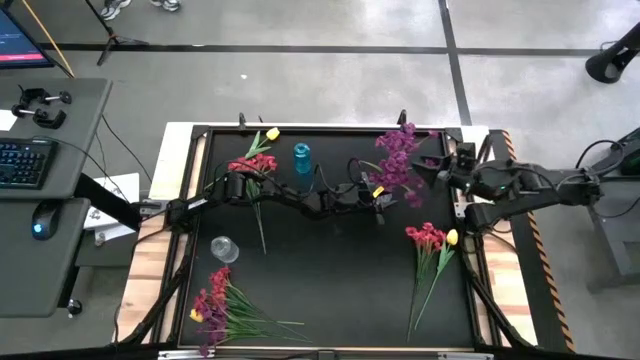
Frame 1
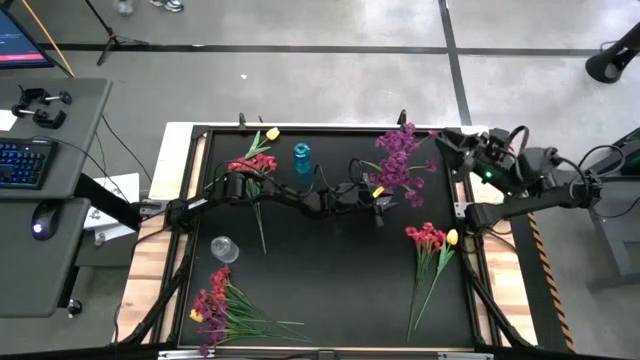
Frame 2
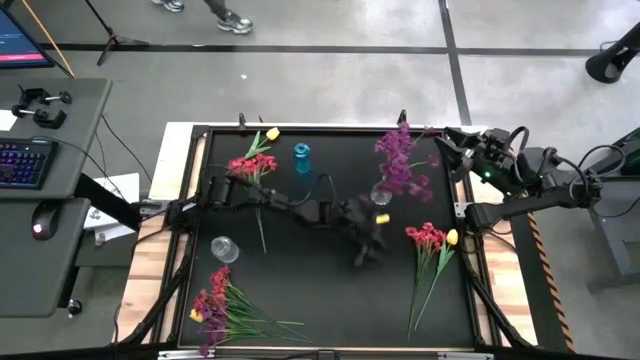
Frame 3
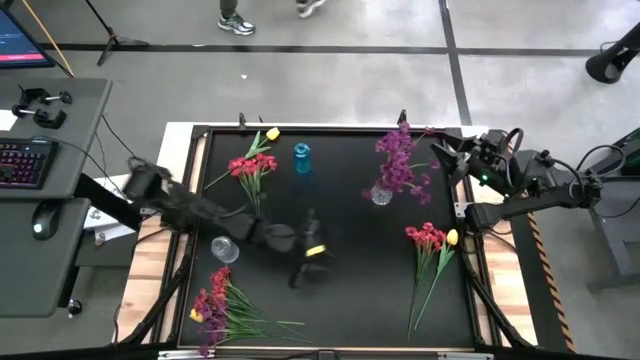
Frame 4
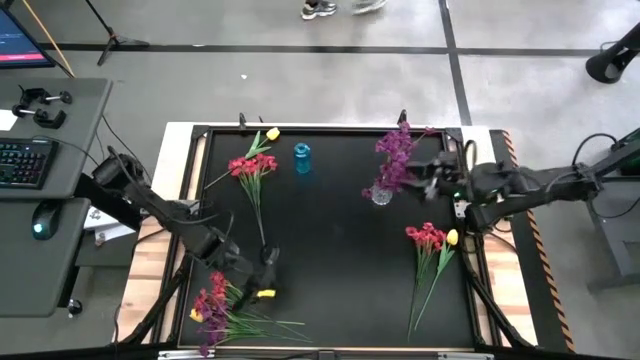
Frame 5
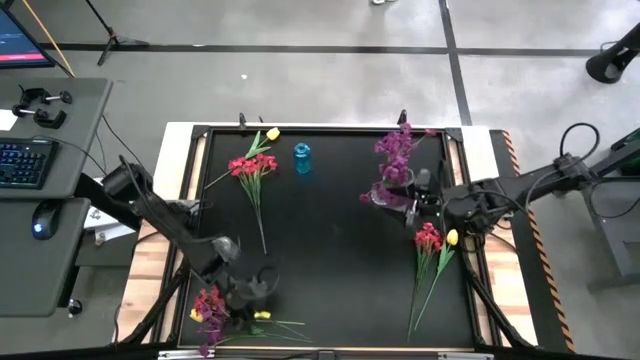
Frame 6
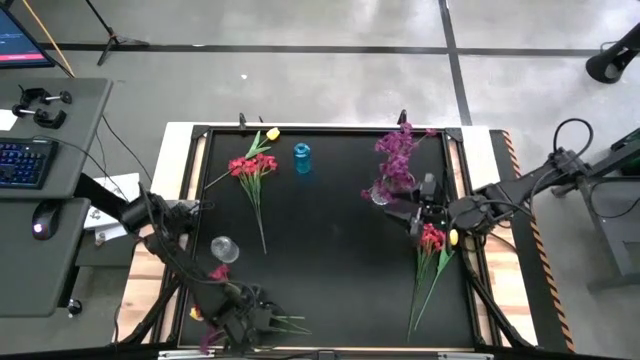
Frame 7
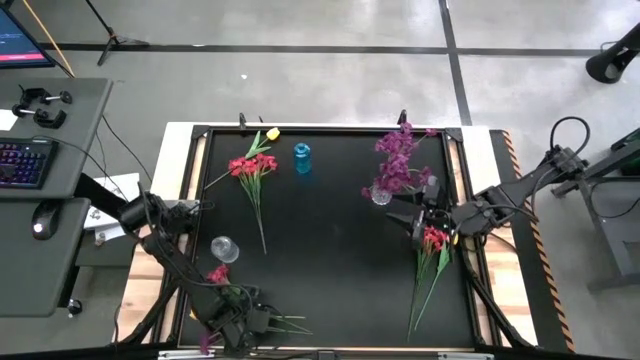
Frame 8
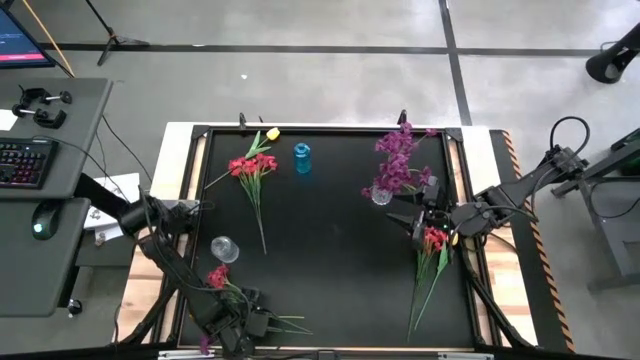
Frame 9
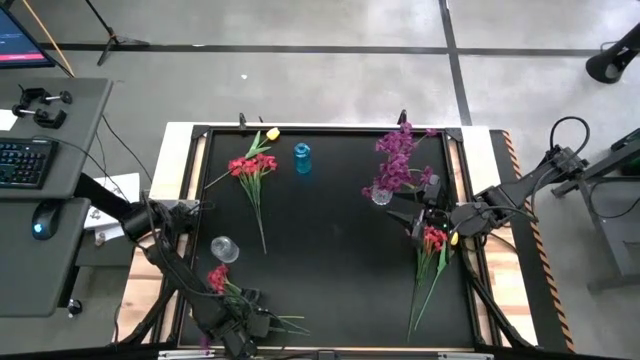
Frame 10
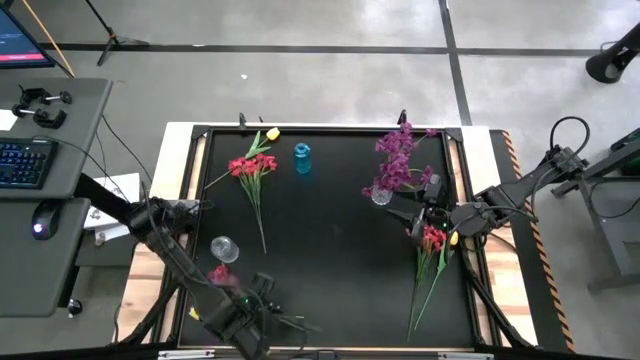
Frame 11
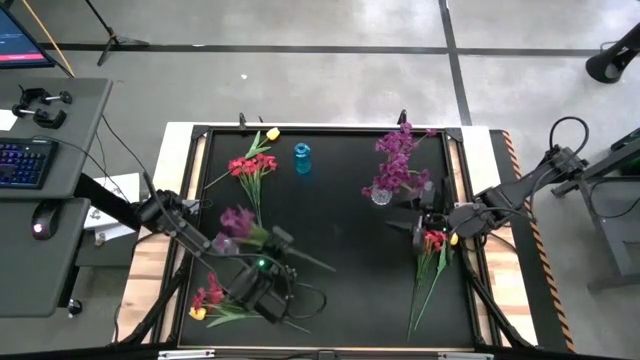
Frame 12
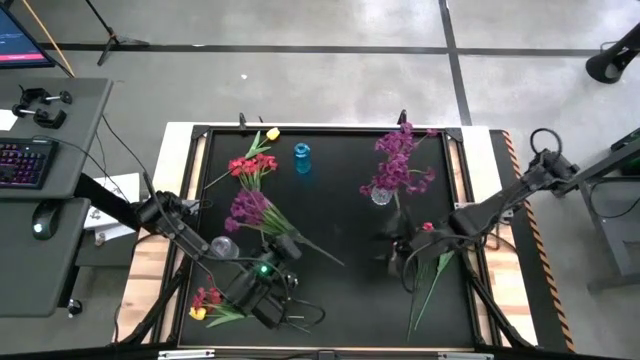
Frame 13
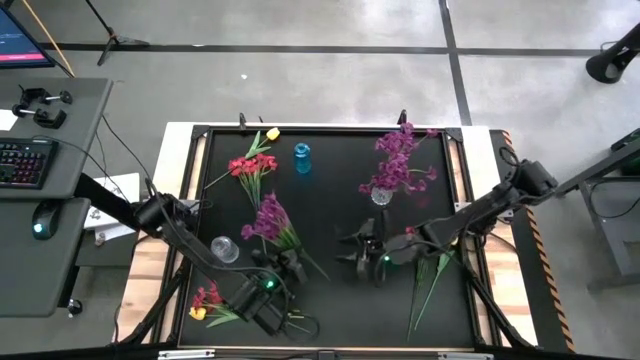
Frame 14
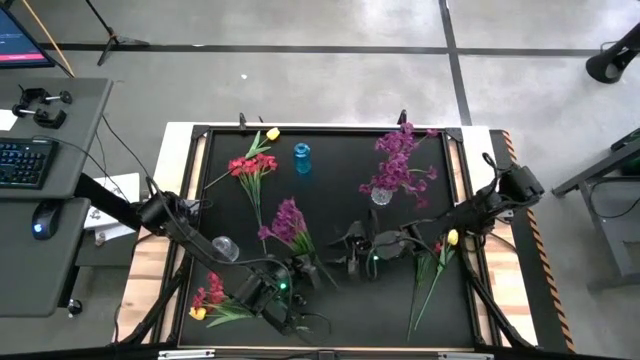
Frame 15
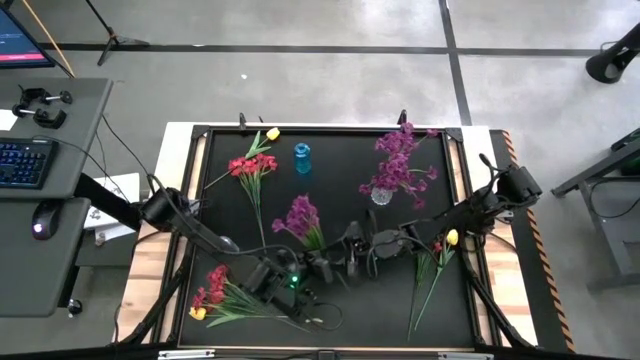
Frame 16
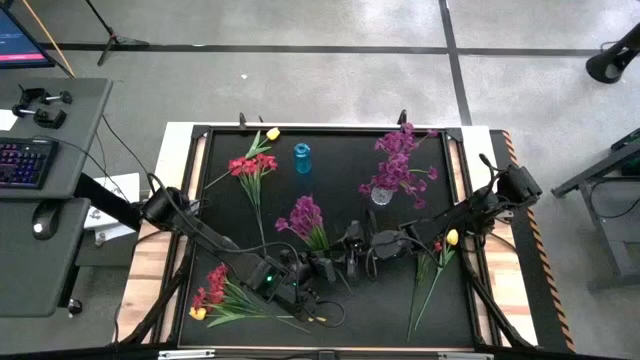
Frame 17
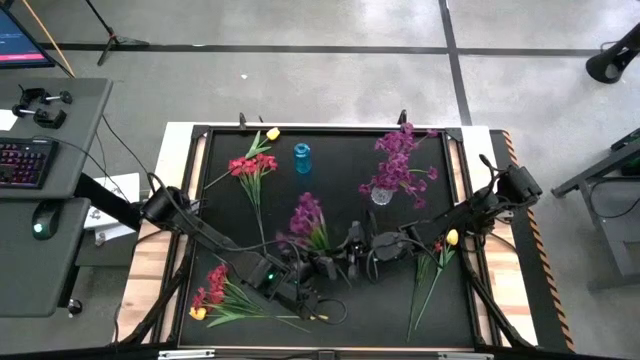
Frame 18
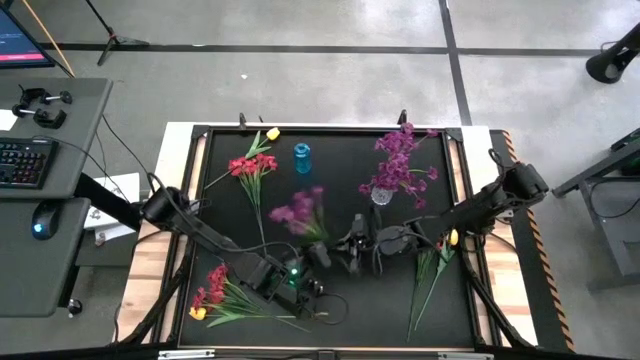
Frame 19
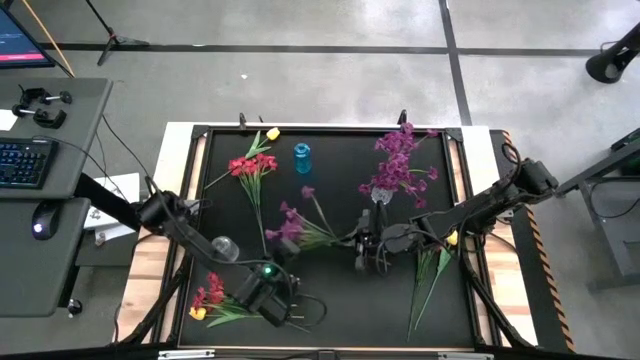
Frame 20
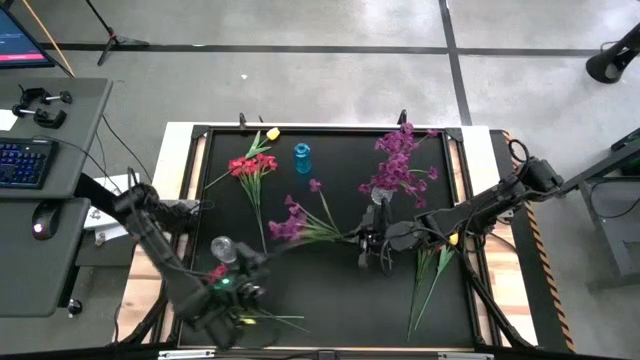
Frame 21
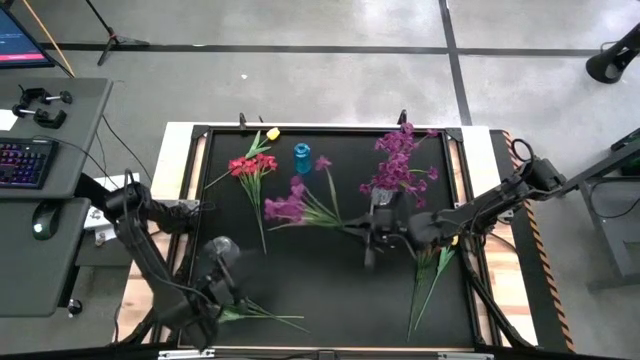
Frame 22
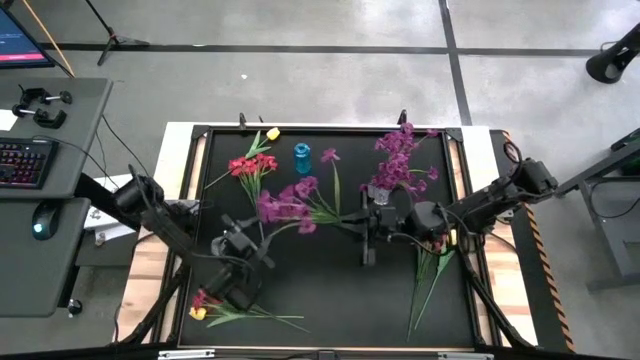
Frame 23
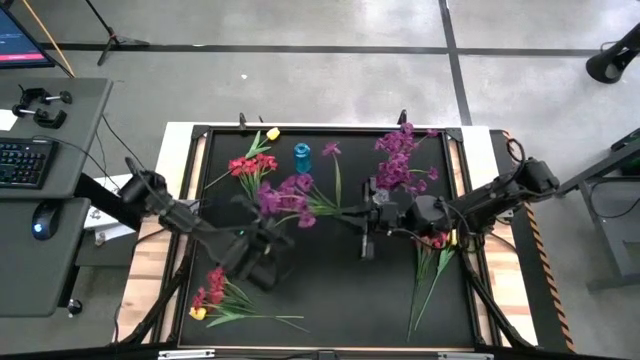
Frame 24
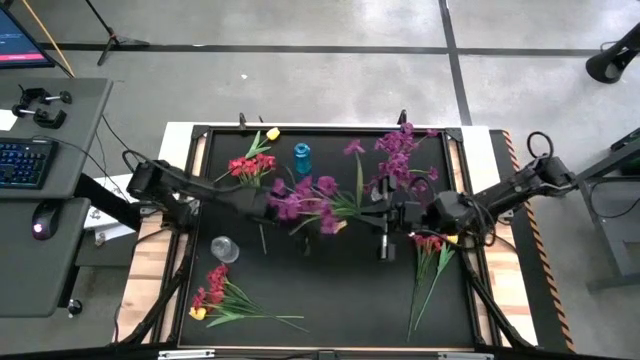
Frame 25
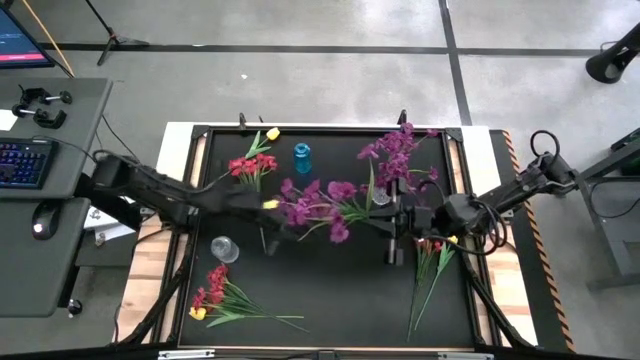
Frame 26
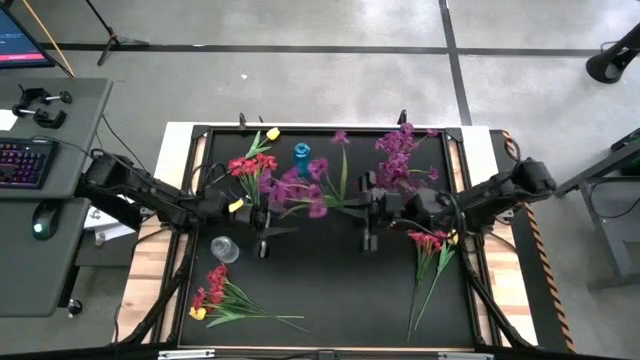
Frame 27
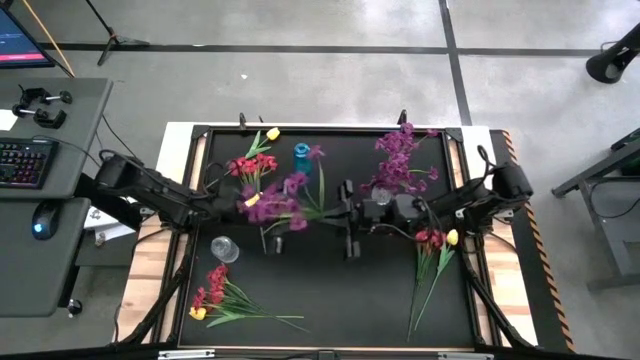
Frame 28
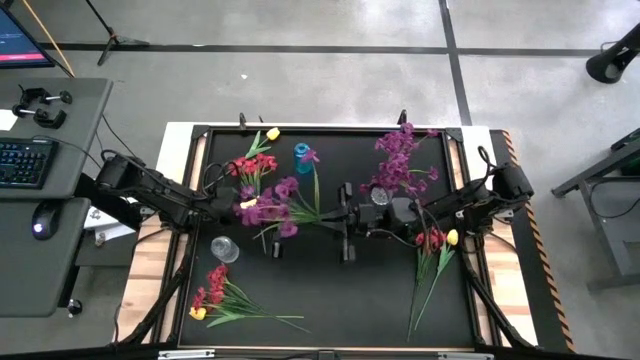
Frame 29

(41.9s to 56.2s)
Task: Sort flowers into vase by color
Put the violet flowers into the right transparent vase
